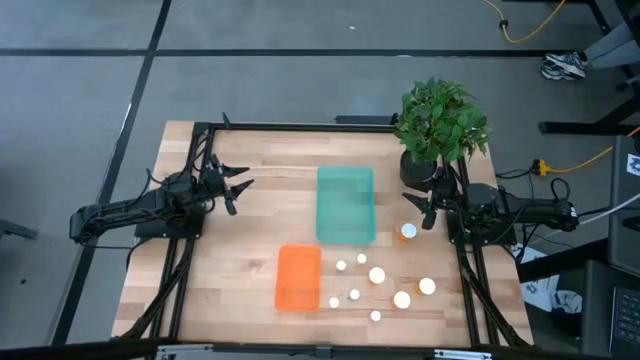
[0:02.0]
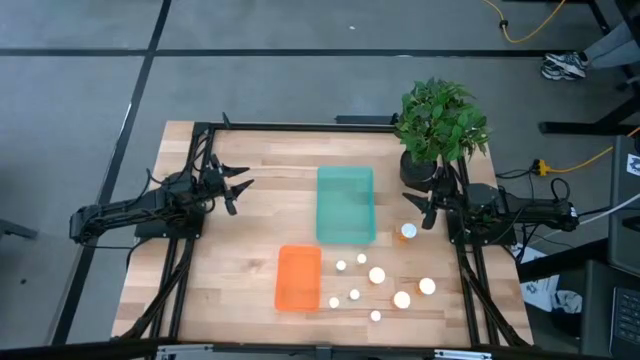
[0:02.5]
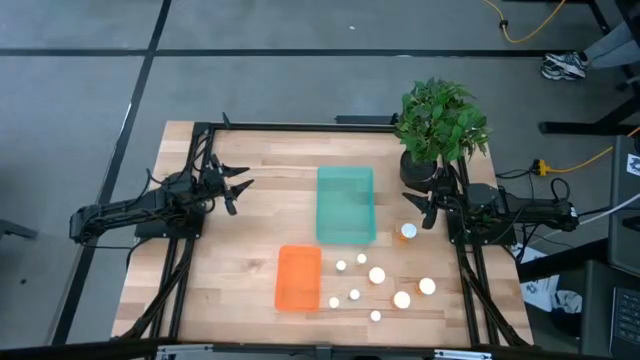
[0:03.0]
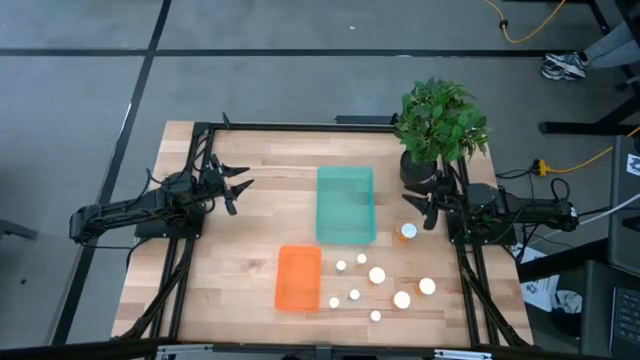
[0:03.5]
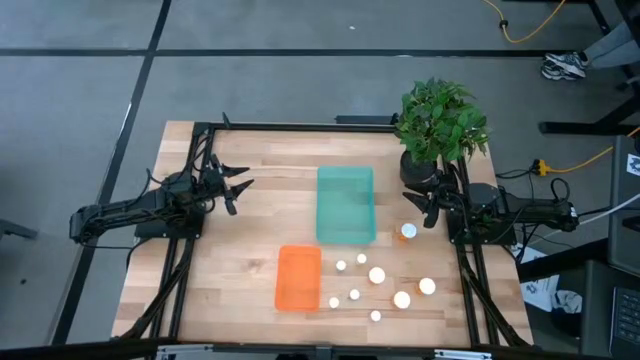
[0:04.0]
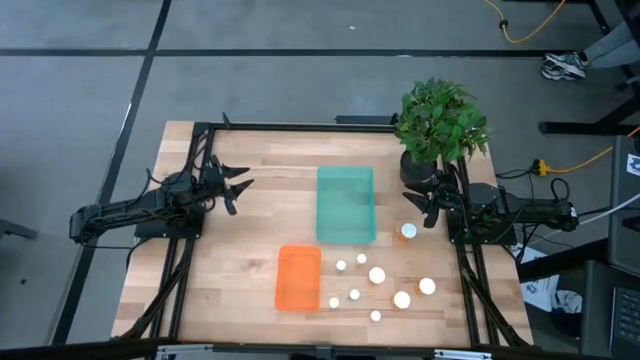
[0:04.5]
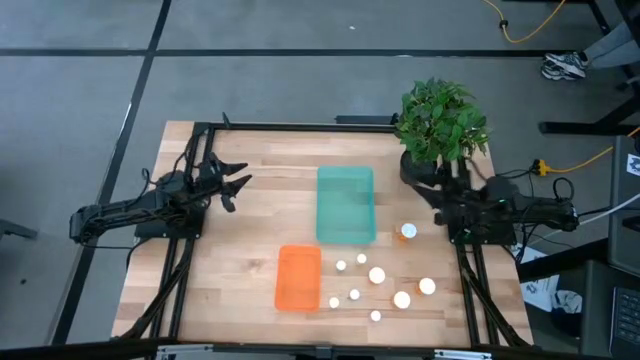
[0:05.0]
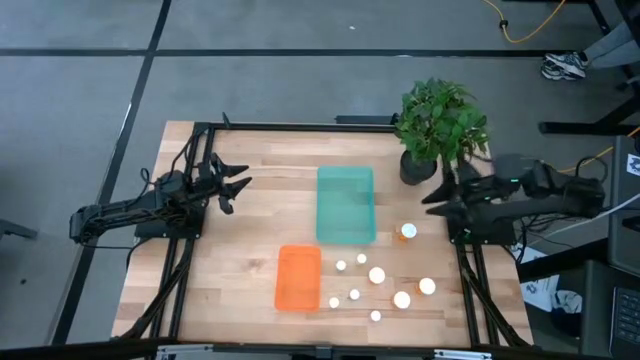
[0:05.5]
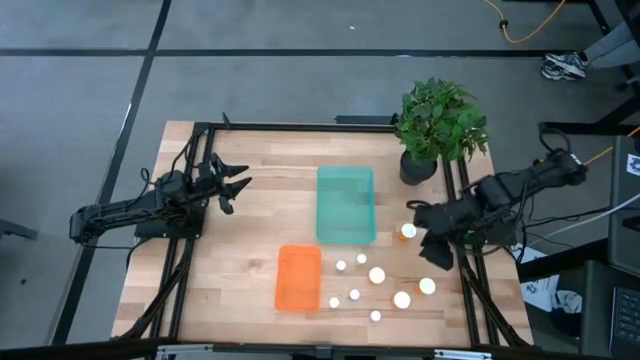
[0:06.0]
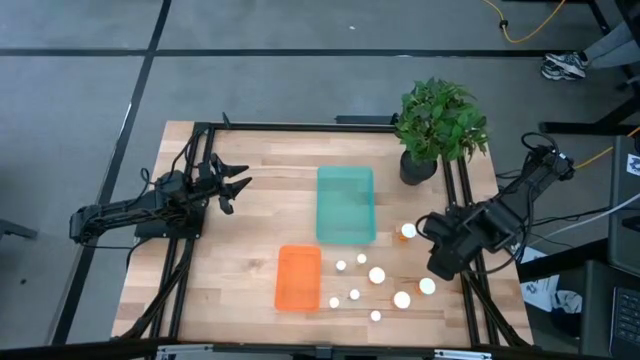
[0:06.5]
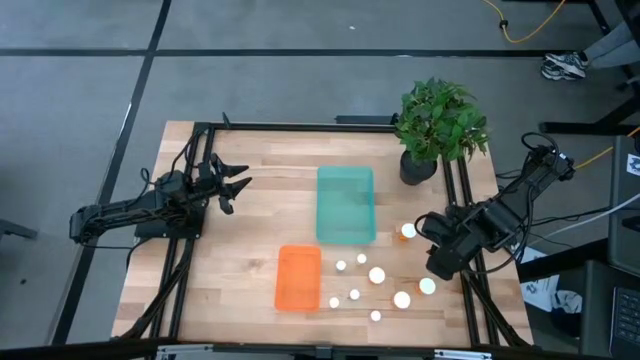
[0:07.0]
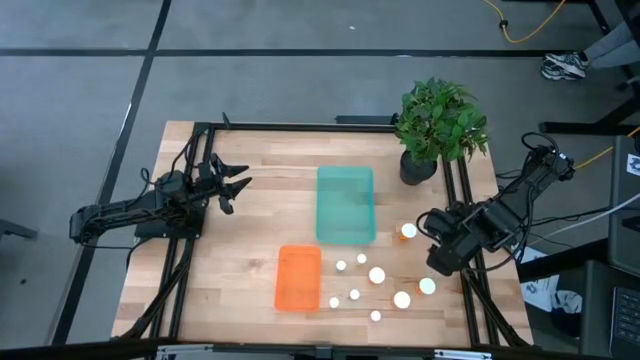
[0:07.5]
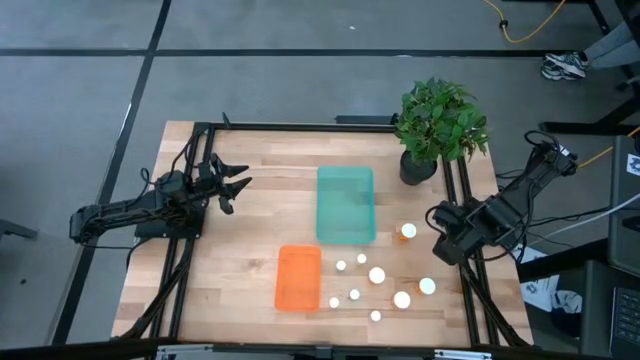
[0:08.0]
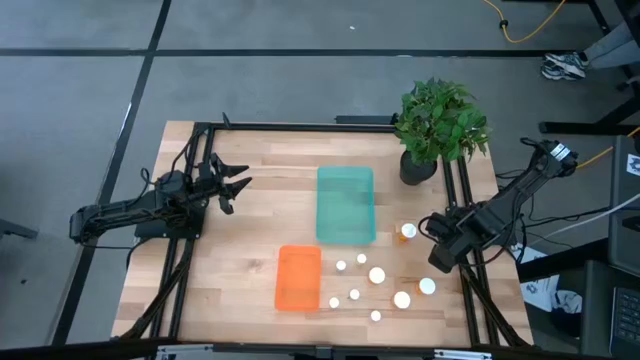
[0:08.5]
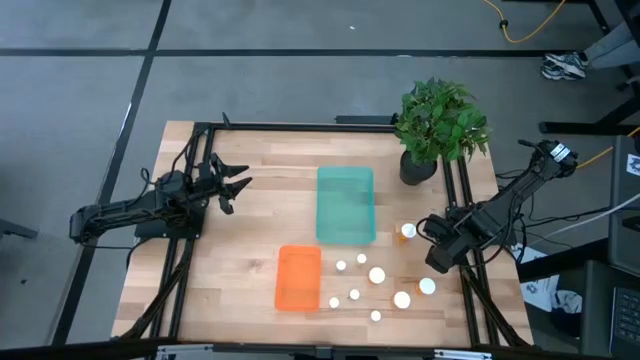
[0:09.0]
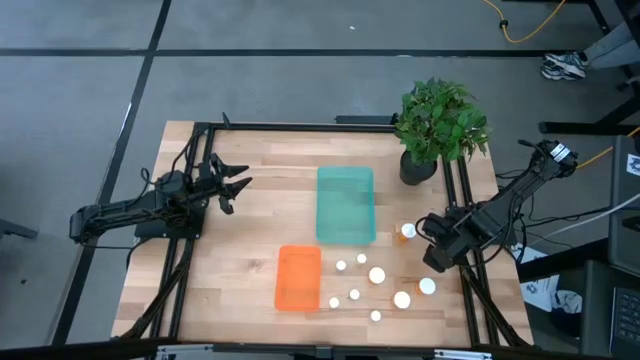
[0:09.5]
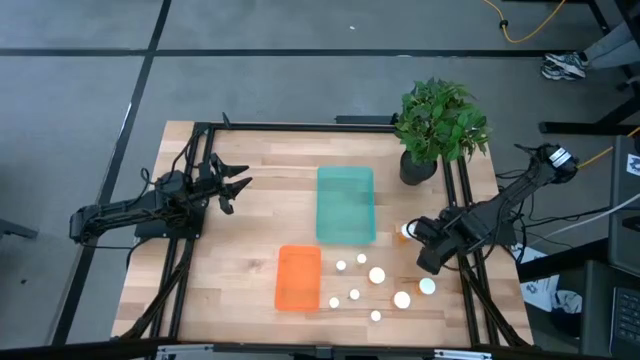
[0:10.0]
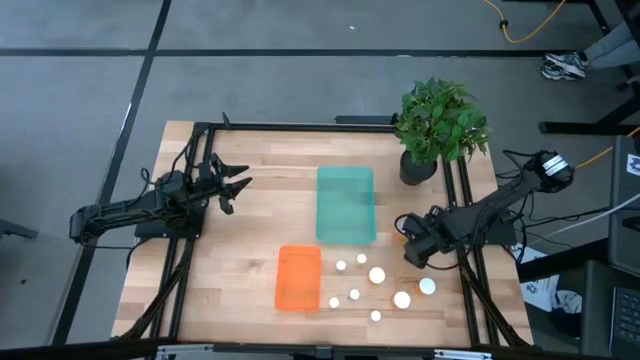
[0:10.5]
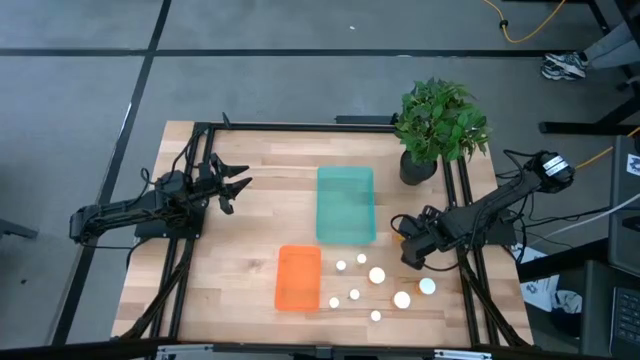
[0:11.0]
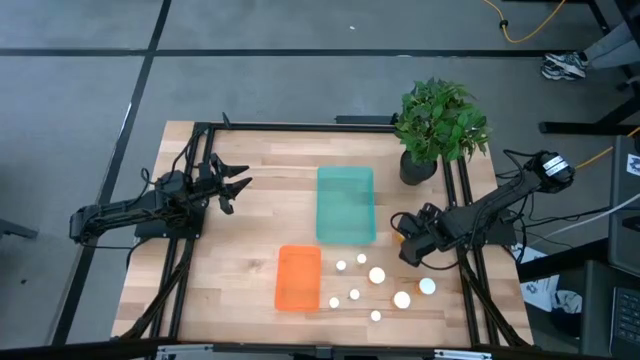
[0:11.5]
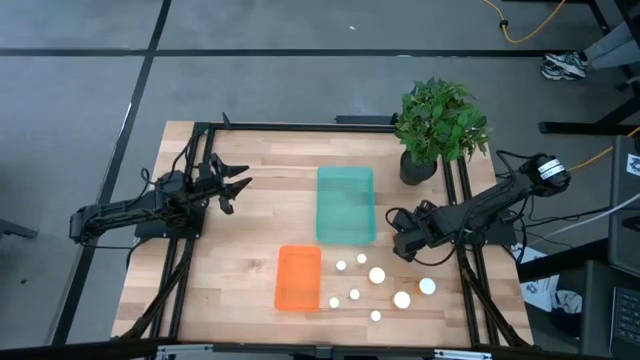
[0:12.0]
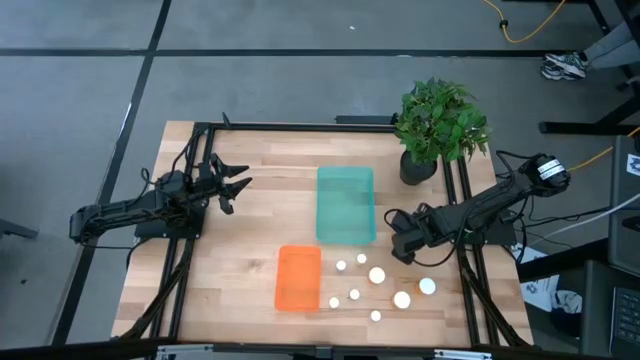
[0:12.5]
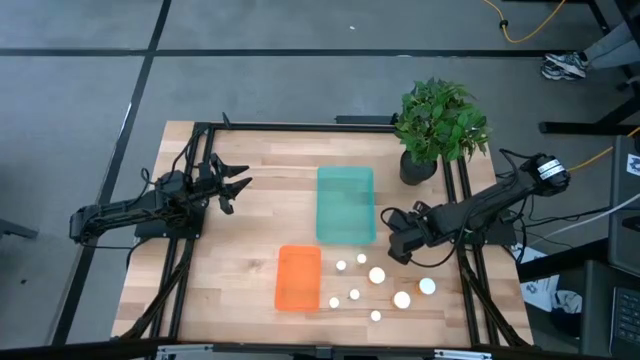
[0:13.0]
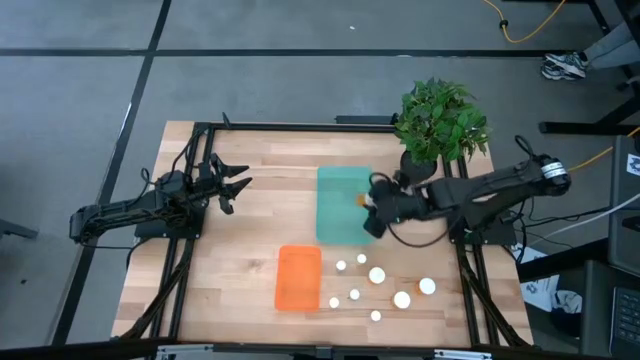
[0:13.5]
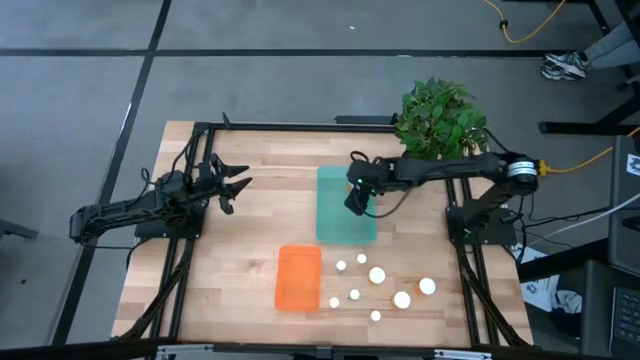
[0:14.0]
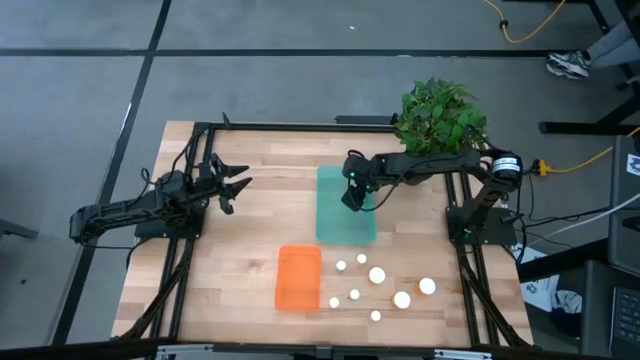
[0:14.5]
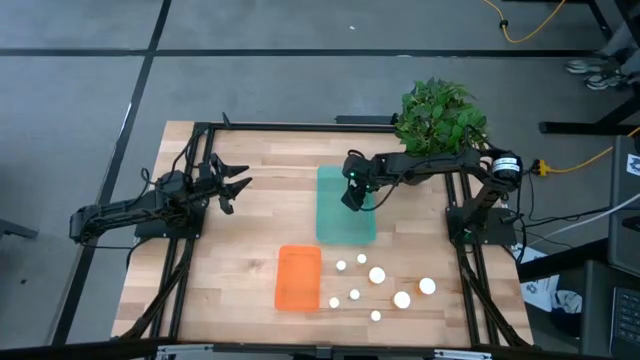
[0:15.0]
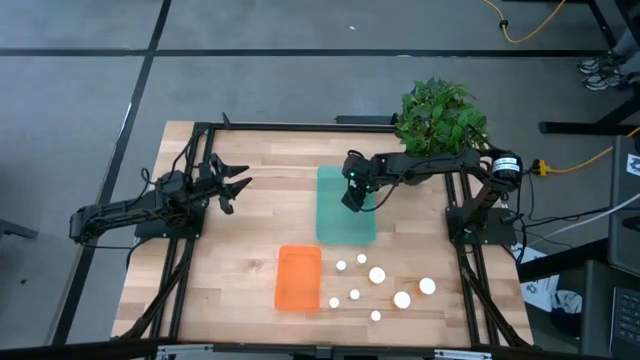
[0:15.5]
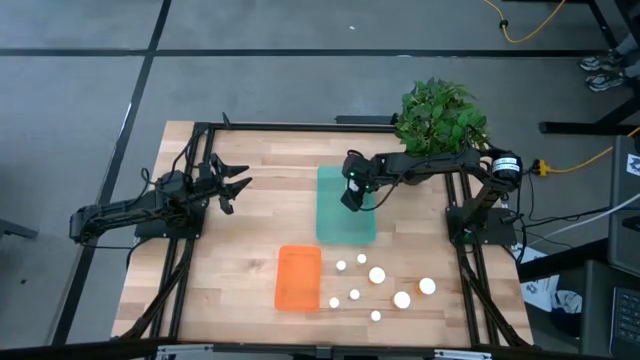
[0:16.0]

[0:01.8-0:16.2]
Task: Pick and place medicine bottles into bin by pill shape (circle, oval)
Put the top center big orange pill bottle into the green bin

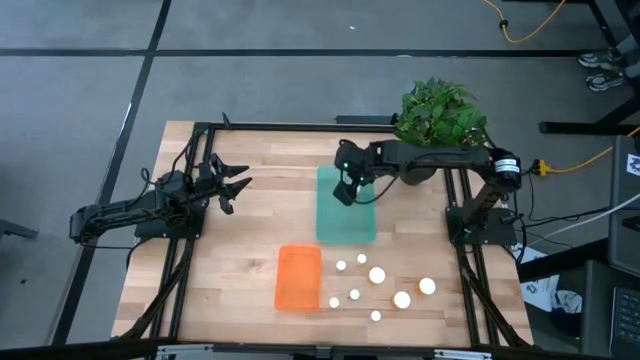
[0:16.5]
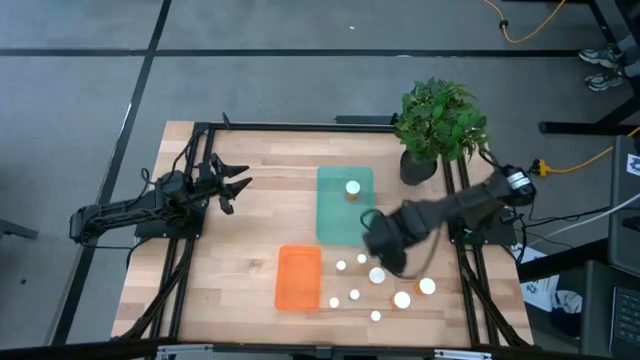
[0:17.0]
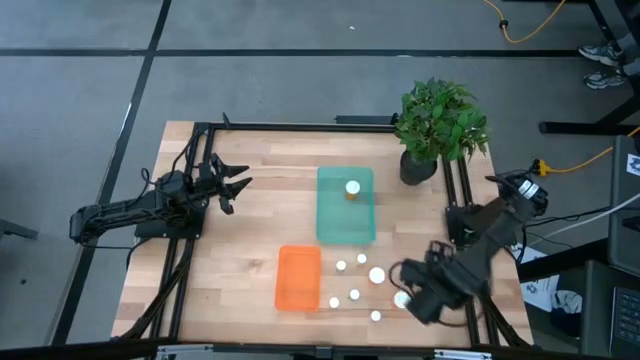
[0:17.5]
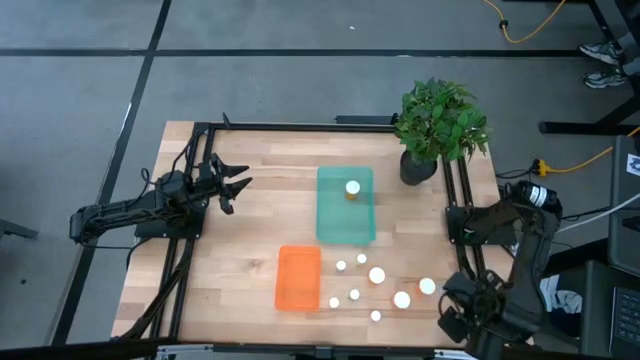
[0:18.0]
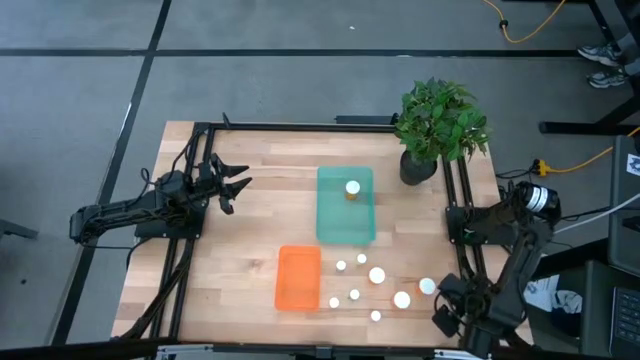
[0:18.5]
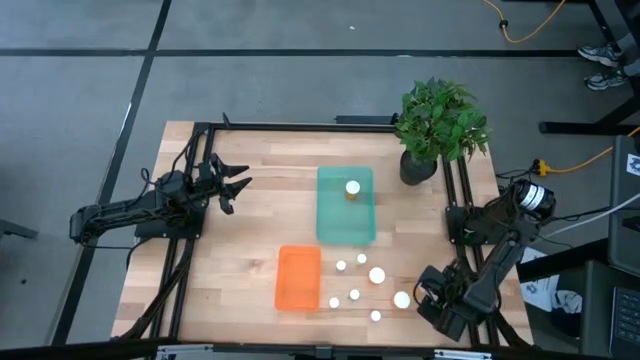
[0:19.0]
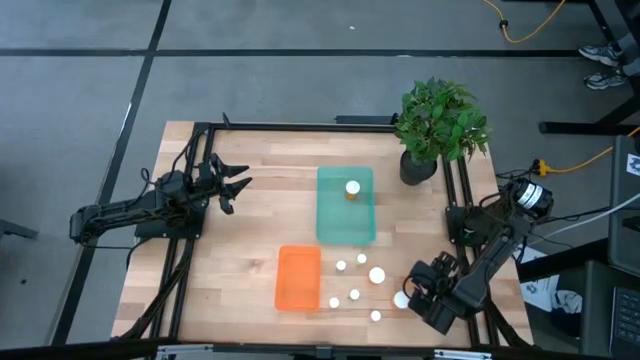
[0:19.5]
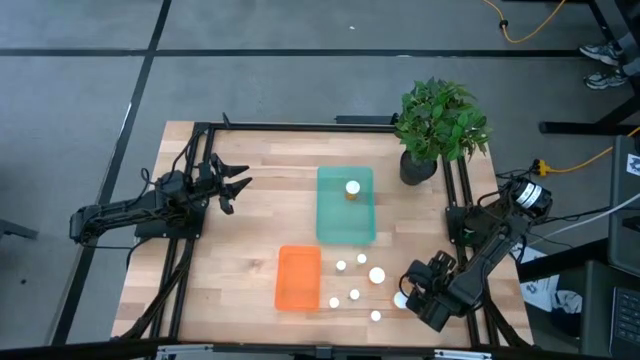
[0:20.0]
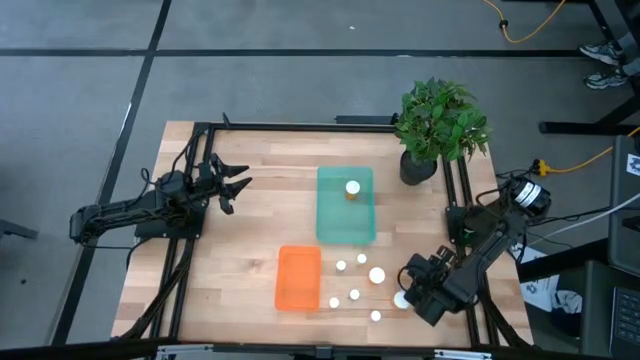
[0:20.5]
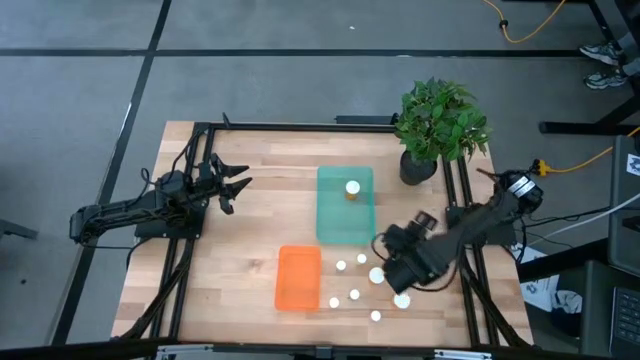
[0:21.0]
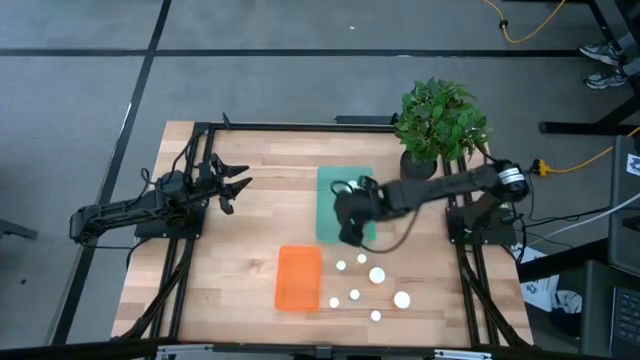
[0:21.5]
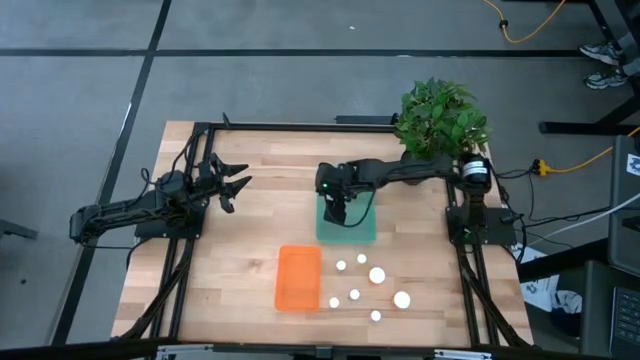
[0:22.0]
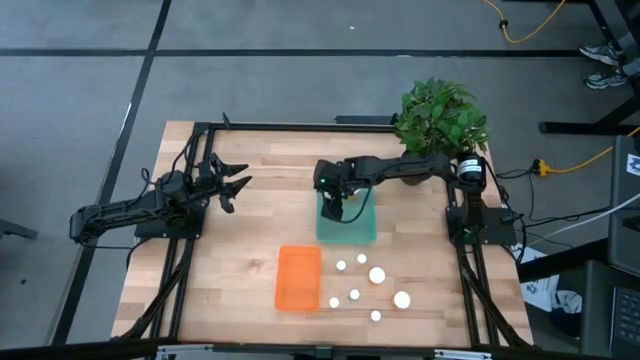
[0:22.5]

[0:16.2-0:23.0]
Put the top right big orange pill bottle into the green bin
